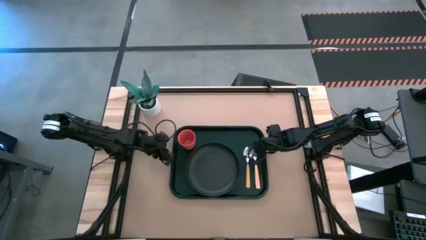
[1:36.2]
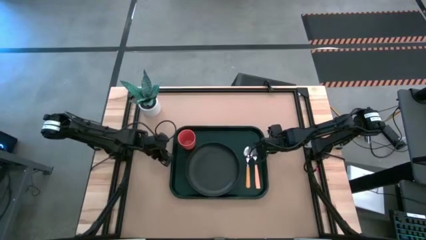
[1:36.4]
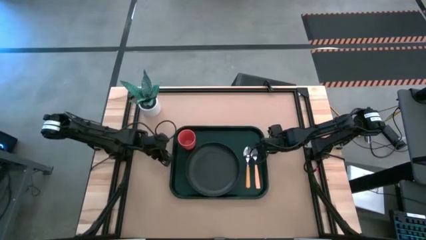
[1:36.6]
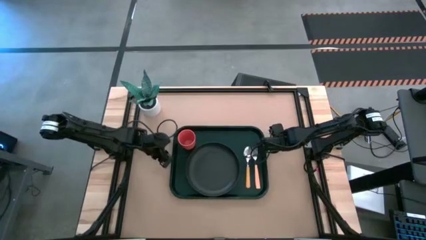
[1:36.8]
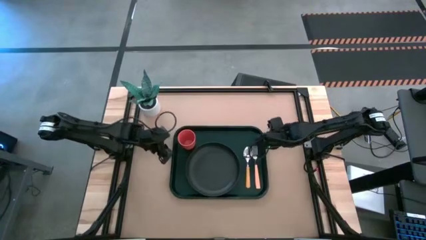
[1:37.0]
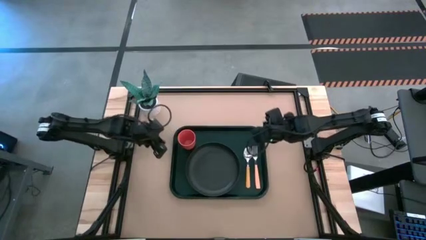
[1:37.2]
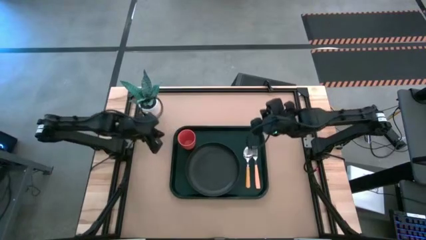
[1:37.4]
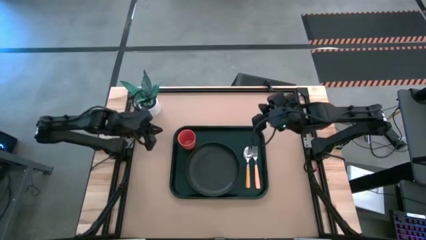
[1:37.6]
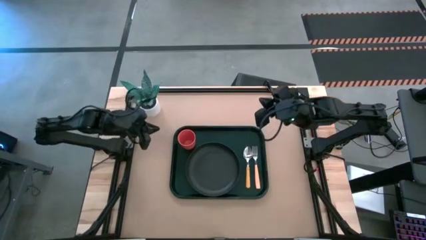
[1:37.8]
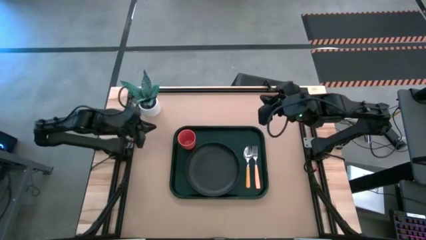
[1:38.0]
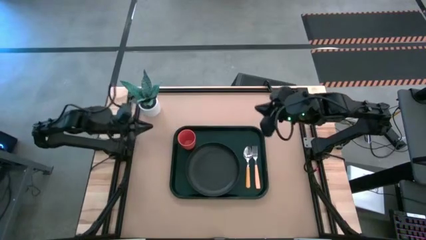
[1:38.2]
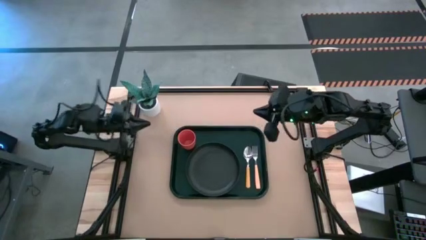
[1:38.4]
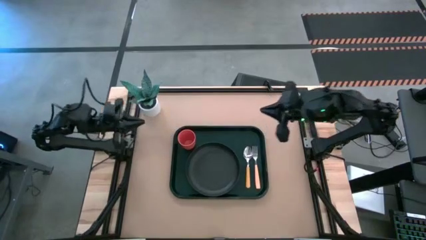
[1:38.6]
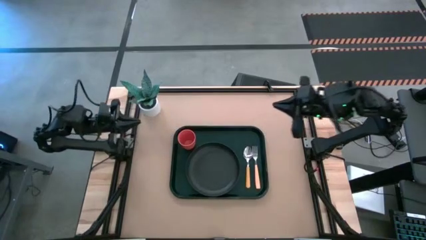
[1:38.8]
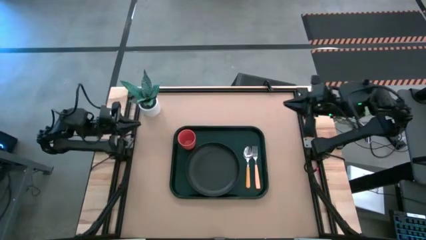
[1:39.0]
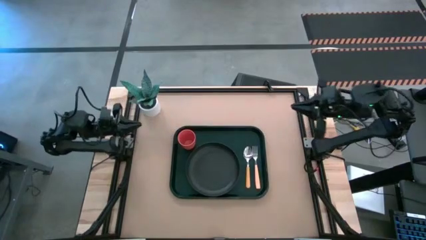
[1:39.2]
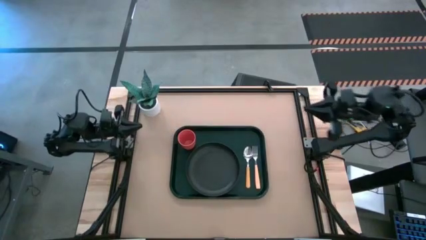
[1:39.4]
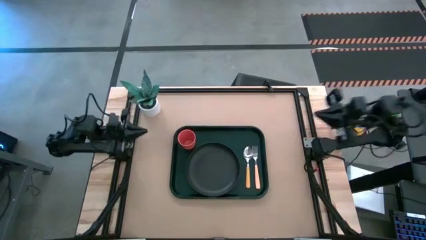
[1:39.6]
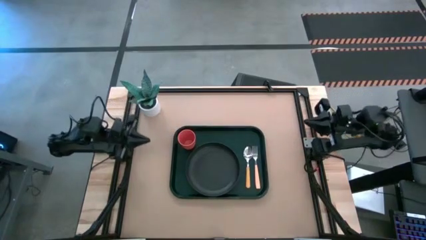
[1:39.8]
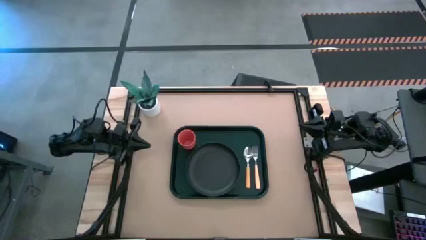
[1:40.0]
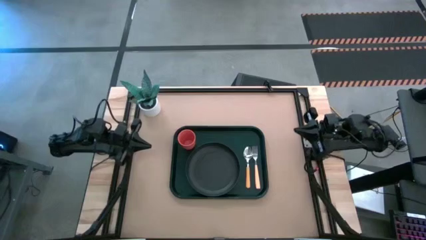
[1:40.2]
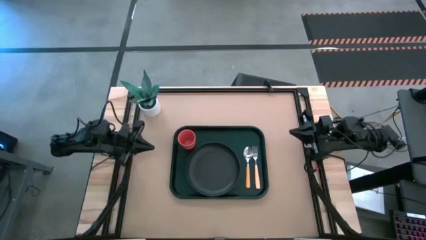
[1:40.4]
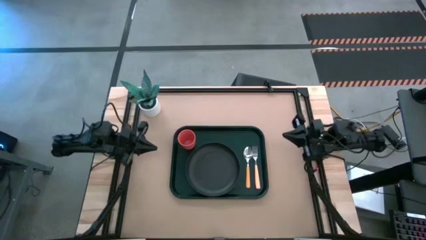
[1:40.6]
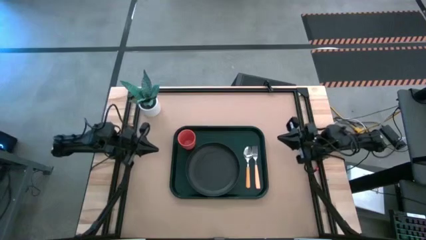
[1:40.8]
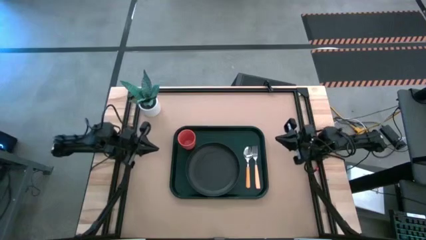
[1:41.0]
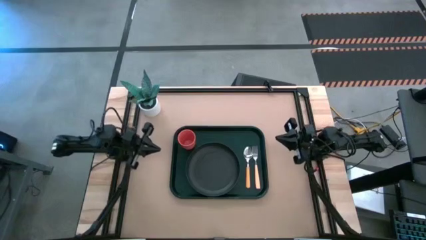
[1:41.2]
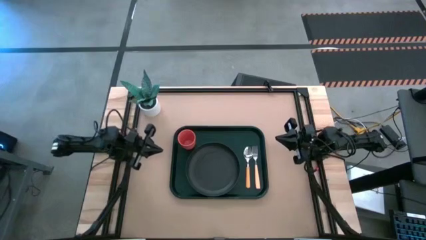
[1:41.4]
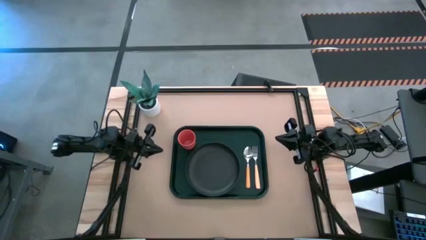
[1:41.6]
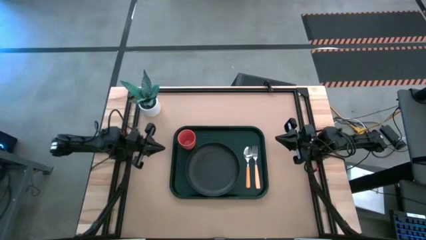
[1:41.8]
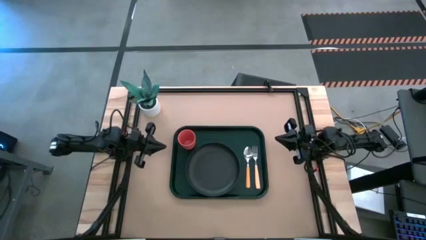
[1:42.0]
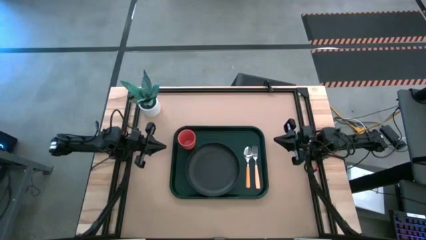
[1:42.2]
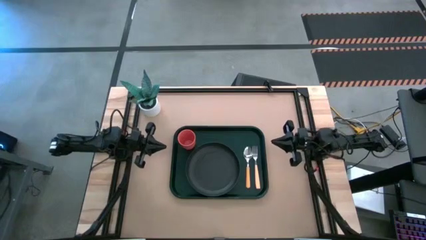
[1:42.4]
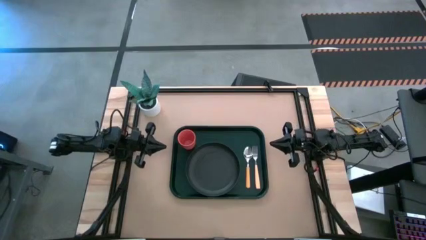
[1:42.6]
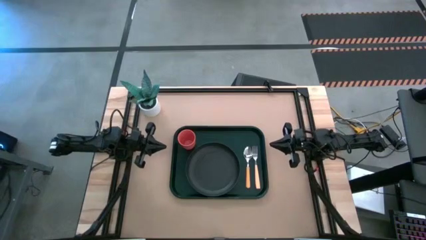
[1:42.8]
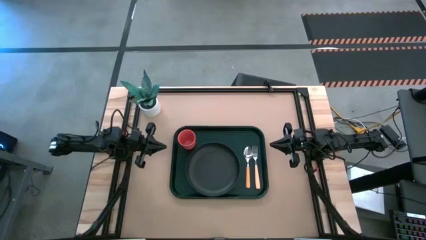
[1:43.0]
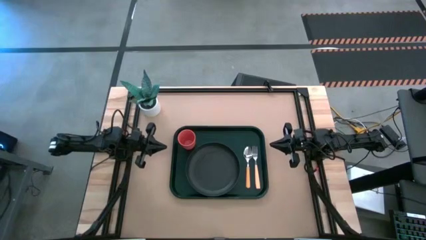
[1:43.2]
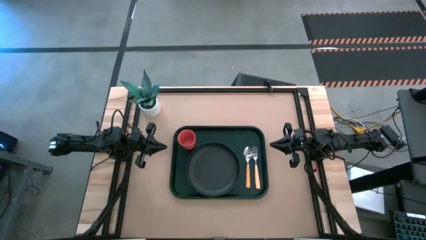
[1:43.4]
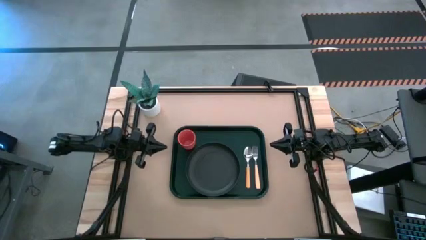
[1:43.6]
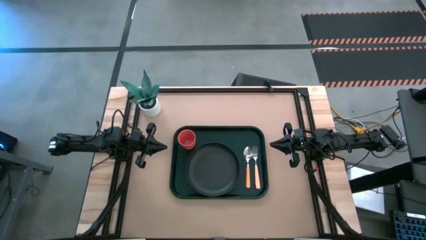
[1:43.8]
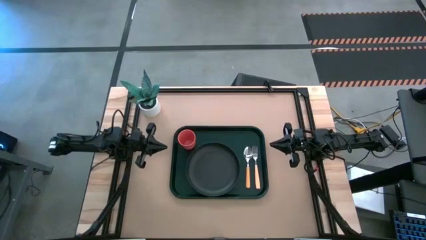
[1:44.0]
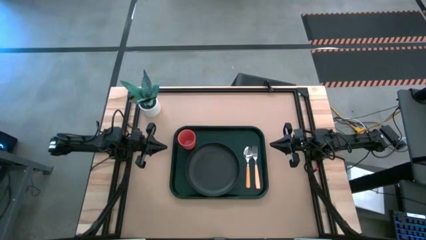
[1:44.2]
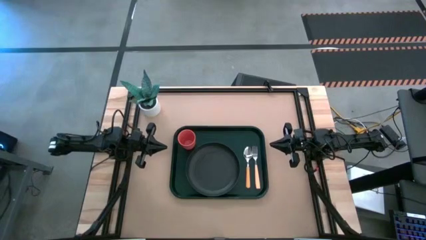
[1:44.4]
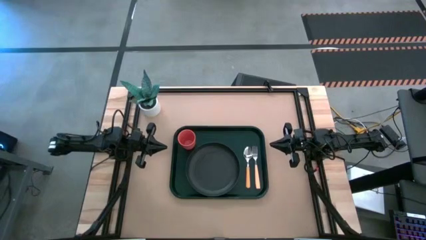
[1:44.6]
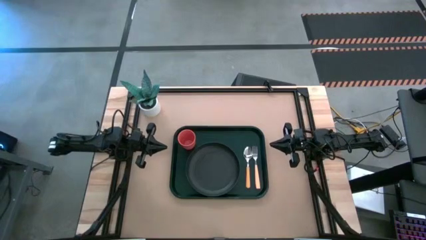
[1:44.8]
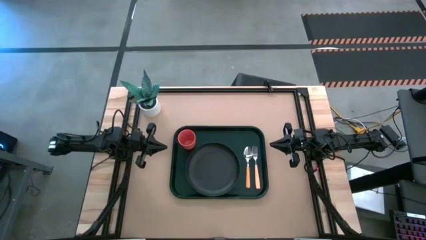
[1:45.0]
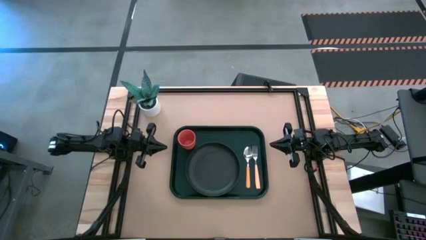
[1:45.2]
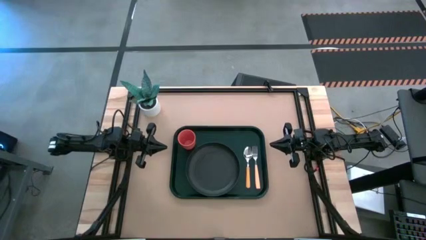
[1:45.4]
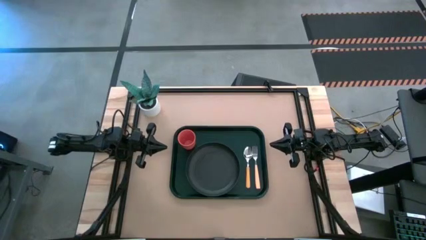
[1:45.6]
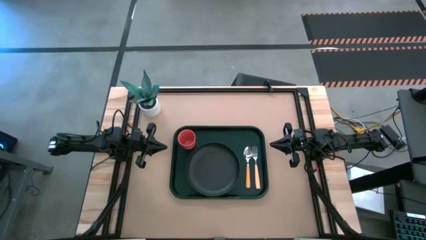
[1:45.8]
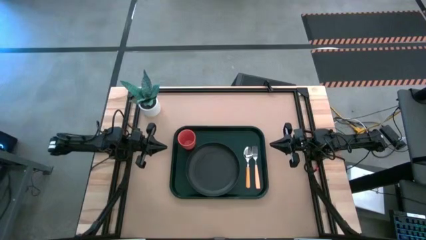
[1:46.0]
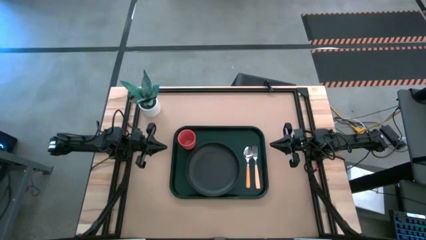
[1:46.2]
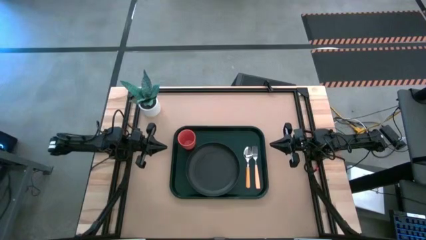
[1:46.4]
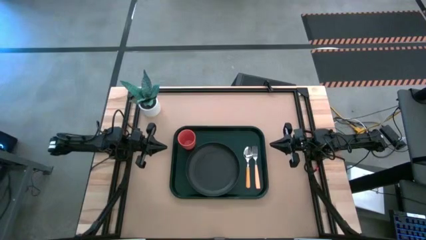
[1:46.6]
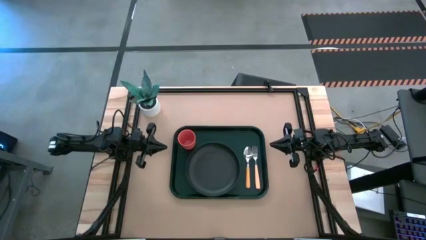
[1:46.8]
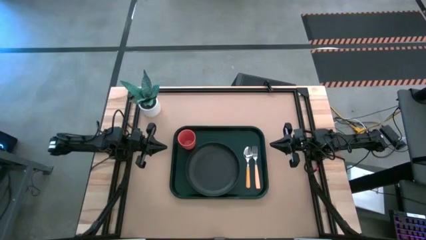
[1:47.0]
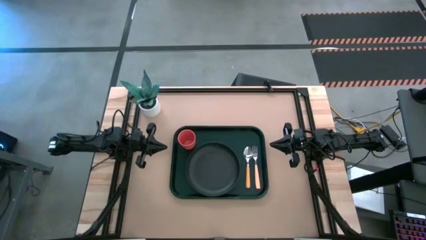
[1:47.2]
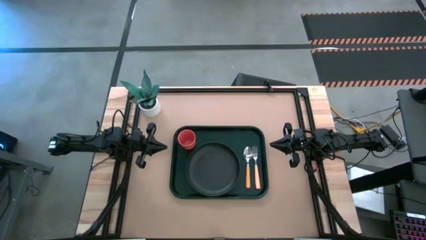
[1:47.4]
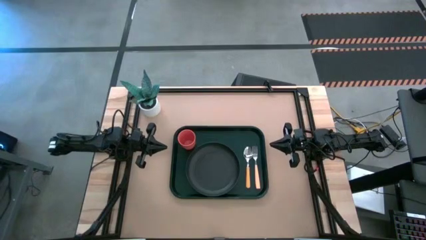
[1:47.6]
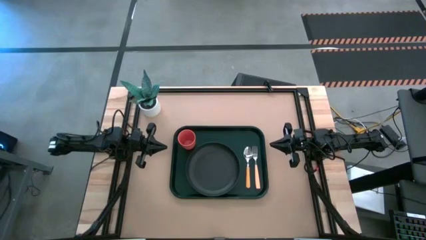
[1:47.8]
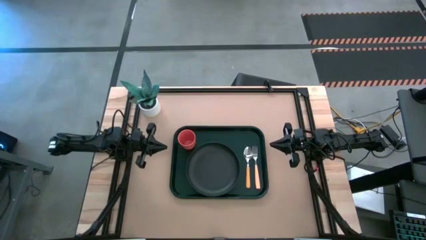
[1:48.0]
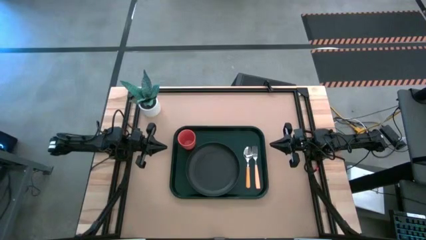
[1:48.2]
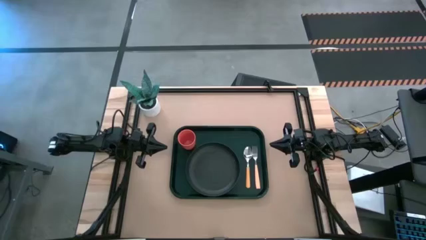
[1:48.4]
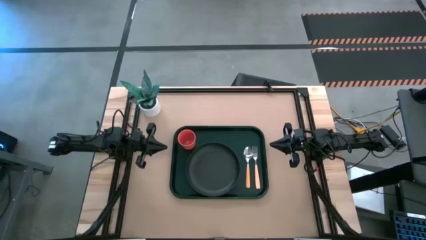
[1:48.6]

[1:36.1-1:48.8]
Task: Pick and place plate/cup/fork/spoon on tray
Return to Home Position
